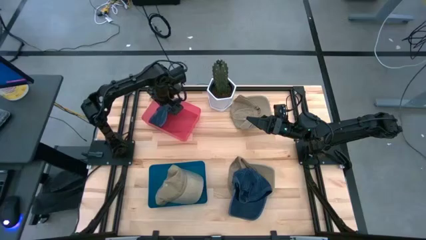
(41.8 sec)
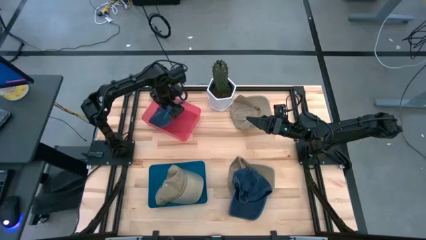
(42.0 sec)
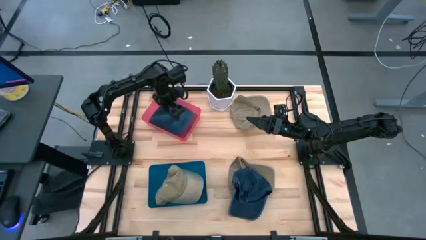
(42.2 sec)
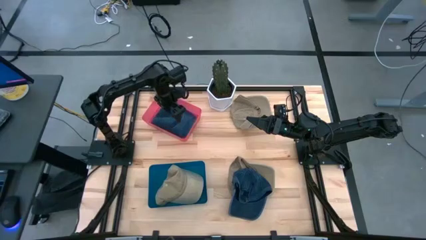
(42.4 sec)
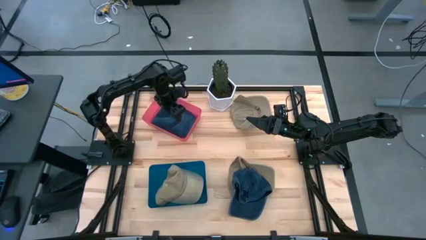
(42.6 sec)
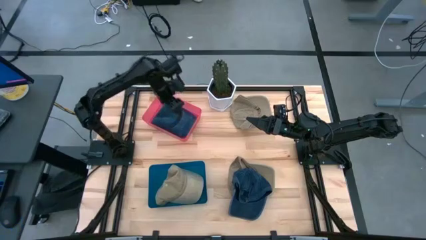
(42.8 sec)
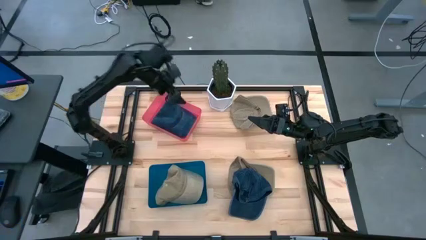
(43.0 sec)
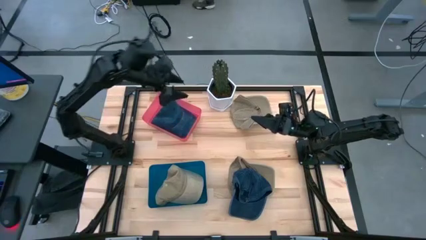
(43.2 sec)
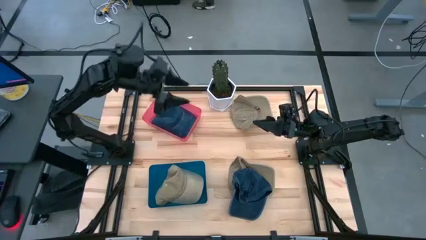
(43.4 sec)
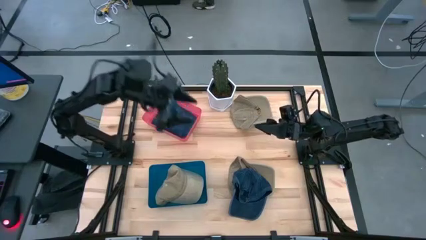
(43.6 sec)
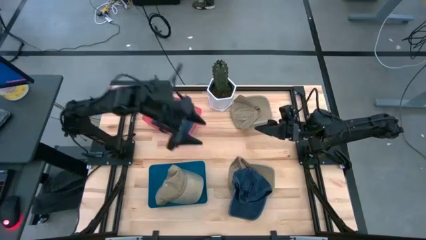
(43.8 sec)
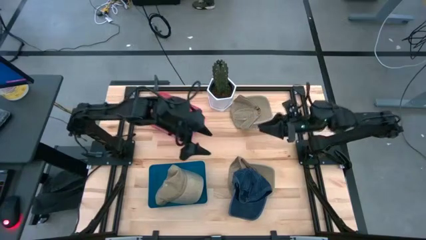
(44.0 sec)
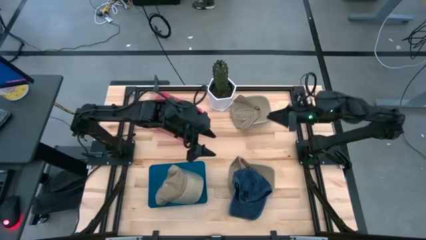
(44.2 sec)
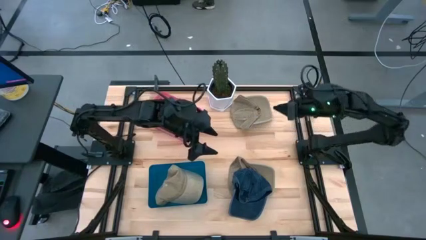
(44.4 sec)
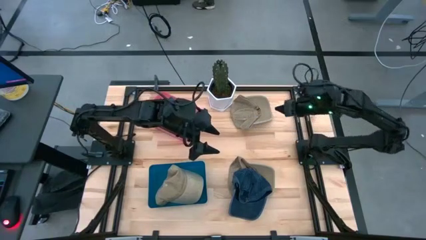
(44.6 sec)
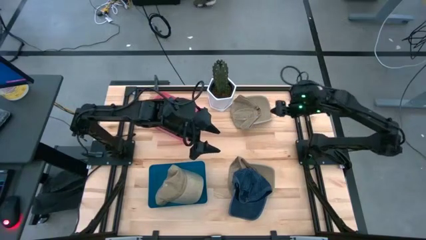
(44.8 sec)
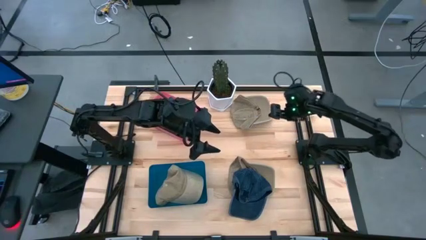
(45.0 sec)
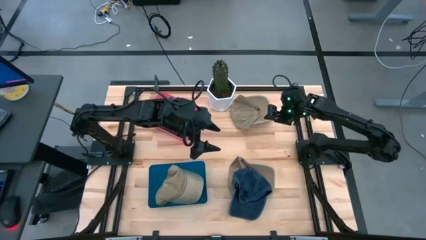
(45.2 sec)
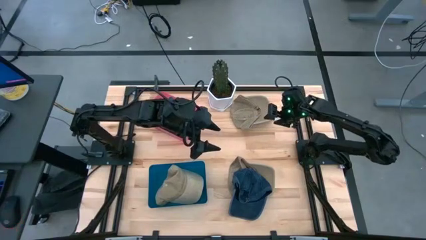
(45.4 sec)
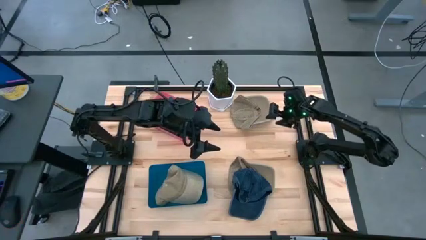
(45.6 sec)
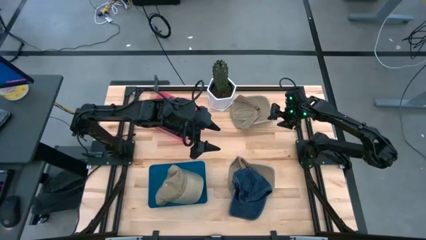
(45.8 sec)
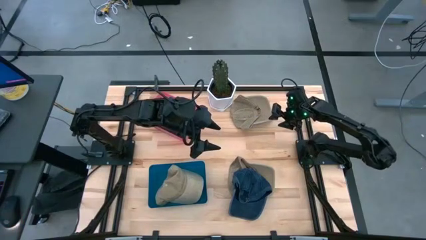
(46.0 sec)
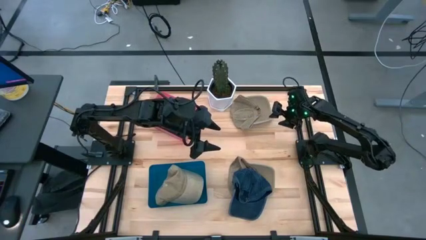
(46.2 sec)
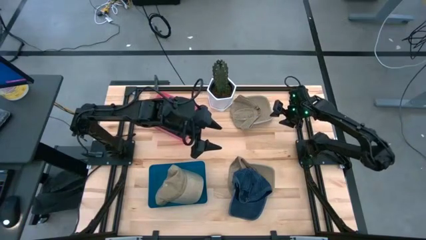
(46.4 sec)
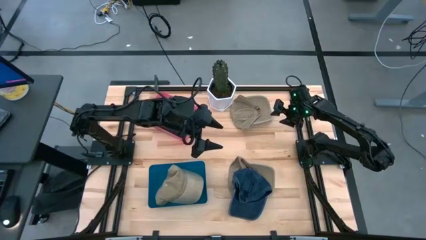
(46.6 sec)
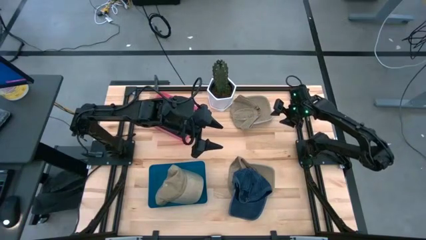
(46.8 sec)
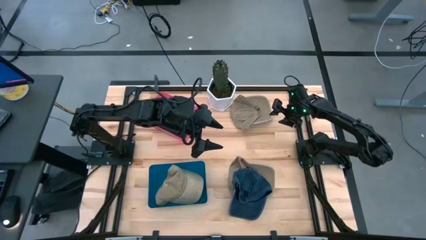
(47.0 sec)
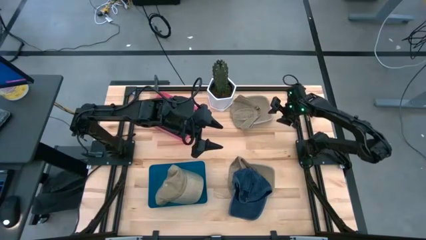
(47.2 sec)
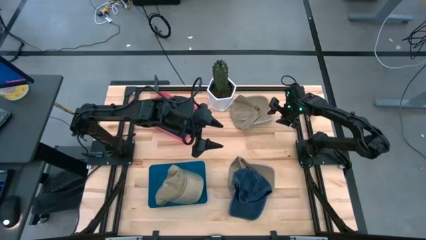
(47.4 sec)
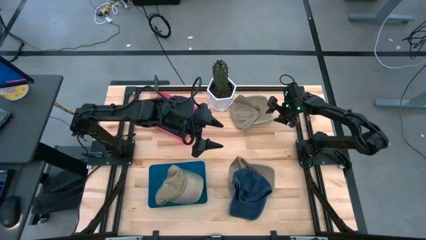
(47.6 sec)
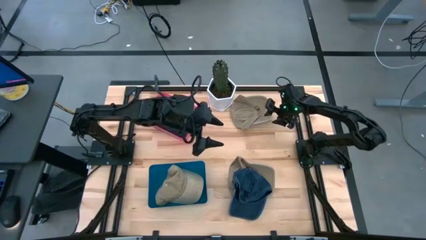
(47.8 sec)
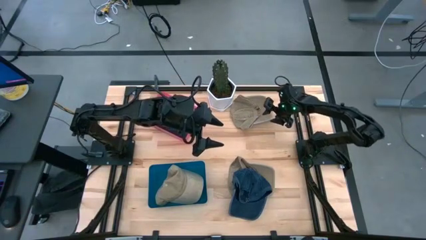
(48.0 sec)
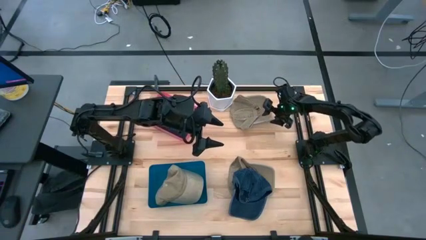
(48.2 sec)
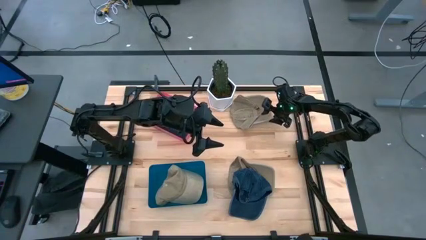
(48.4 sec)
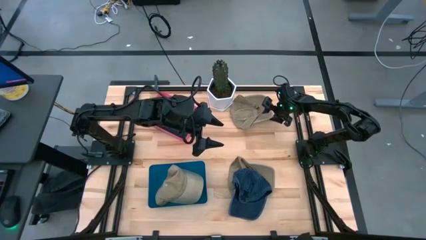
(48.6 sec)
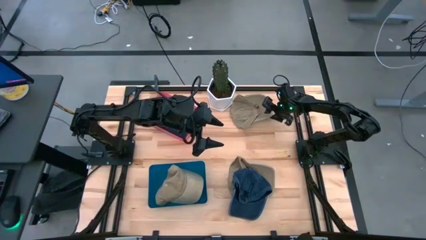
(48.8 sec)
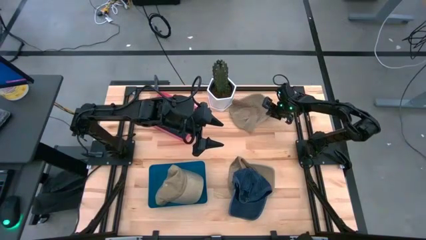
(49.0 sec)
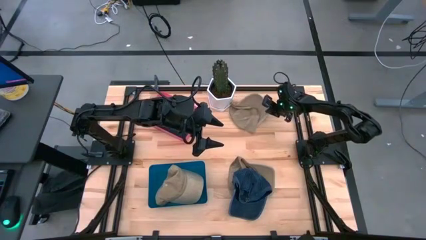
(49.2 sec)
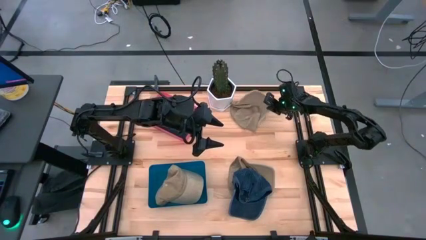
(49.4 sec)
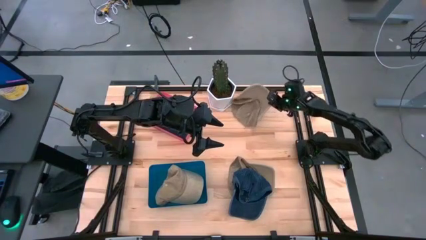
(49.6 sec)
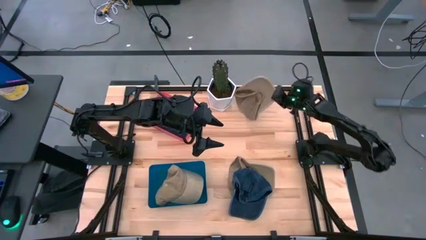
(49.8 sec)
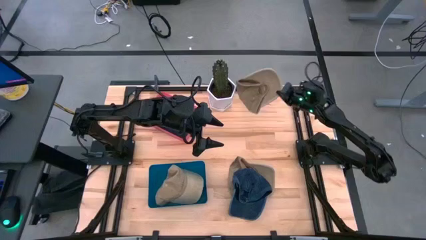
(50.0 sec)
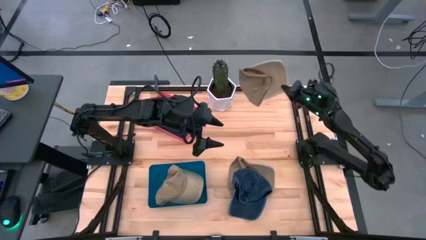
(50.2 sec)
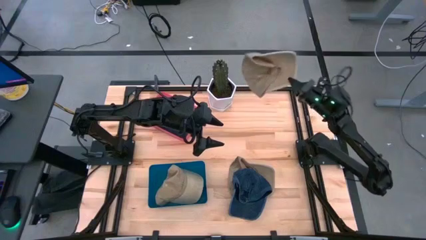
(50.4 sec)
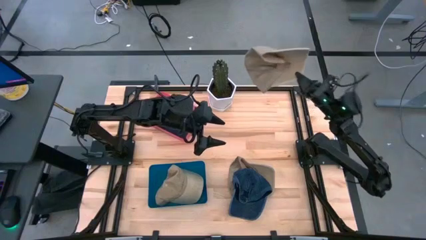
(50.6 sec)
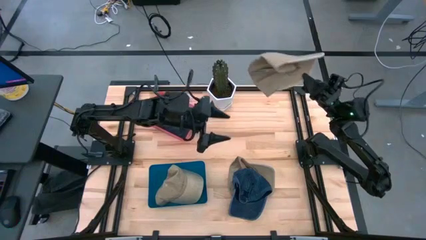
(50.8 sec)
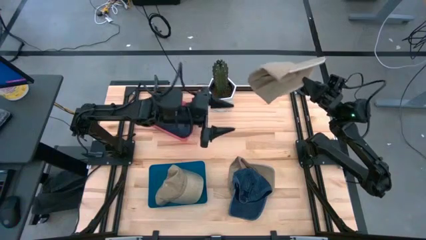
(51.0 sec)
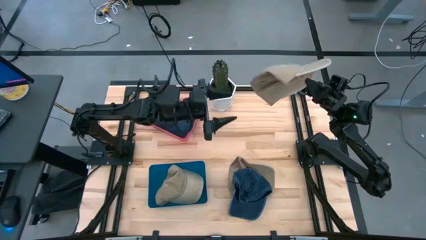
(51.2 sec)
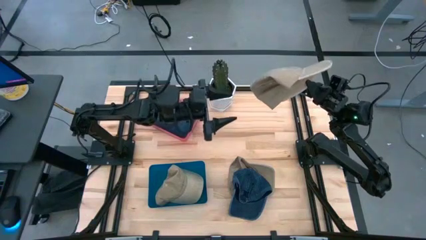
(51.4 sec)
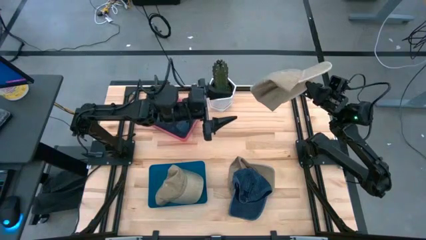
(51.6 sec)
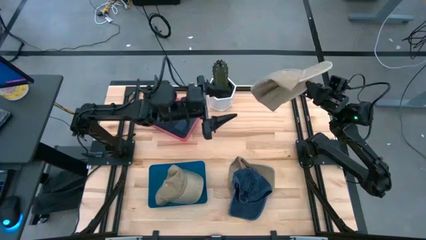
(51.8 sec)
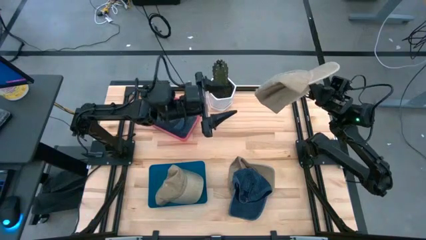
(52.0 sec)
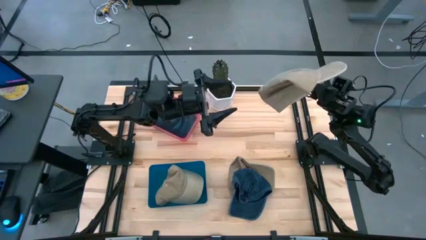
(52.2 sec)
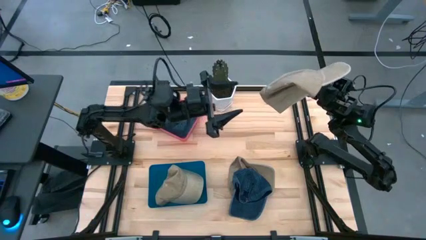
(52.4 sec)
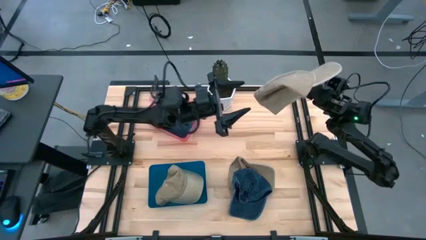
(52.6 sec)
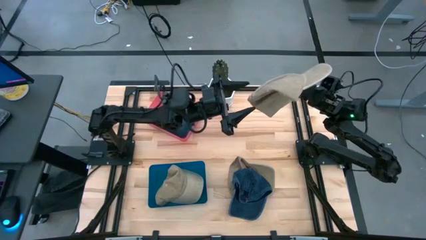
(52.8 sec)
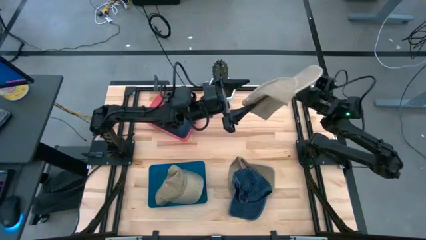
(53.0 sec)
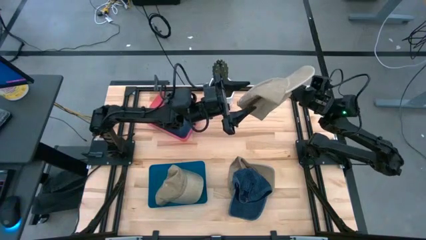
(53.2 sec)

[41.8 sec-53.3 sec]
Task: Pick & Place hat
Put the top brown cap into the blue bin
